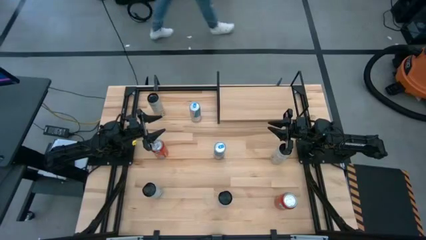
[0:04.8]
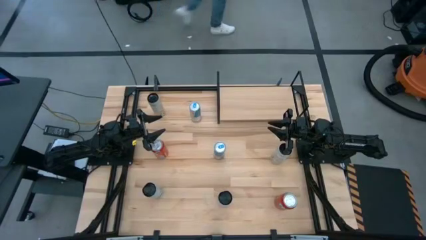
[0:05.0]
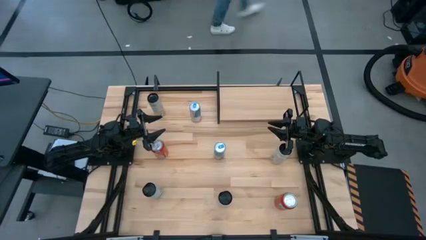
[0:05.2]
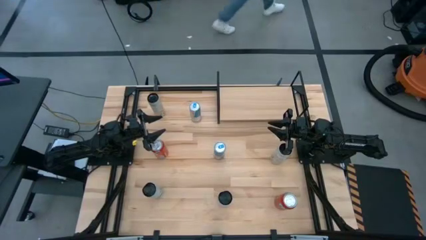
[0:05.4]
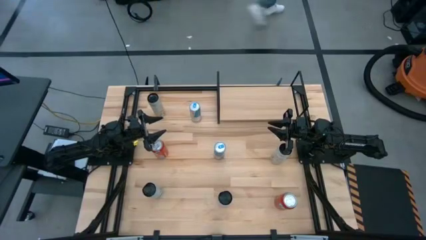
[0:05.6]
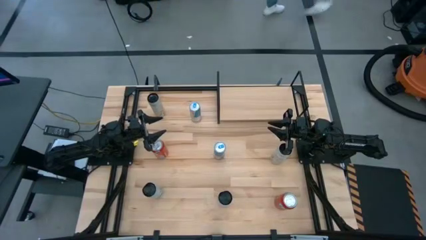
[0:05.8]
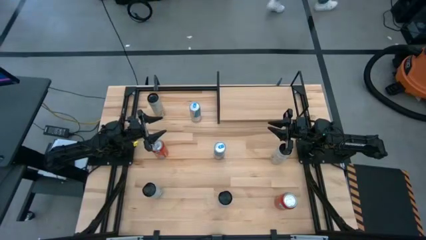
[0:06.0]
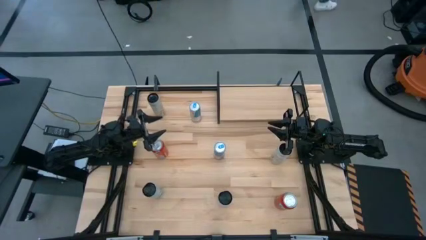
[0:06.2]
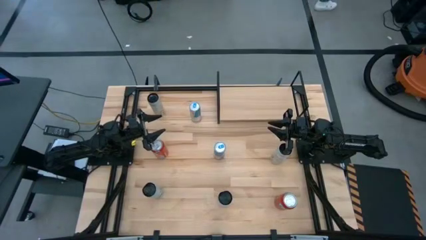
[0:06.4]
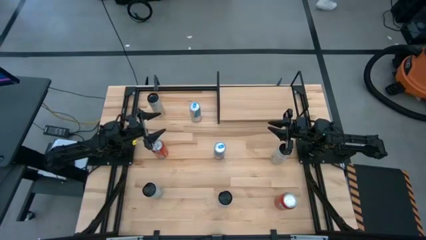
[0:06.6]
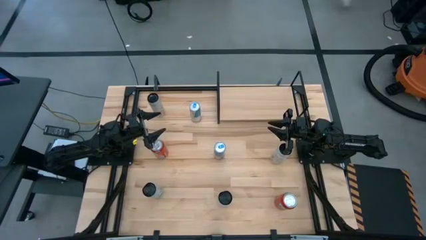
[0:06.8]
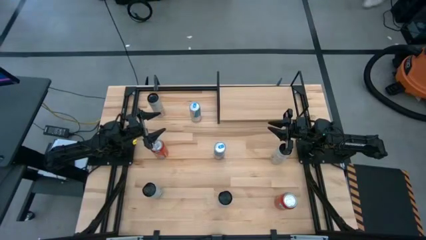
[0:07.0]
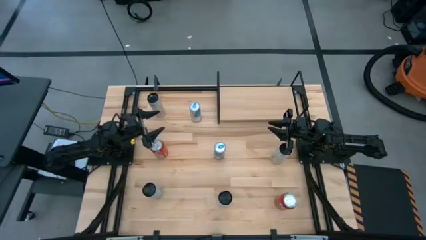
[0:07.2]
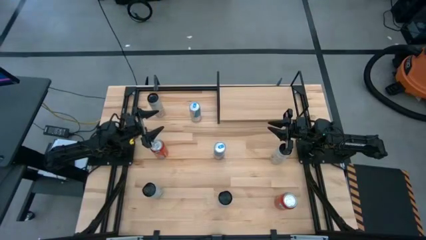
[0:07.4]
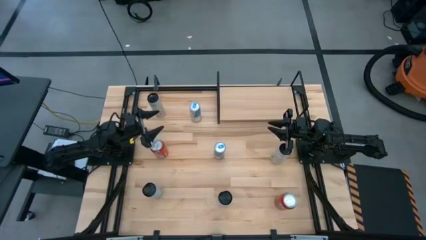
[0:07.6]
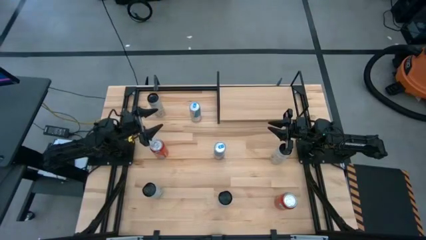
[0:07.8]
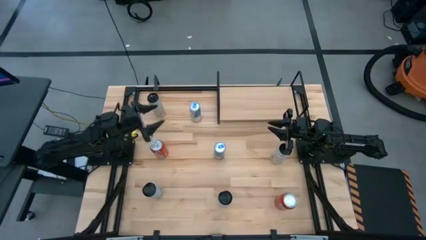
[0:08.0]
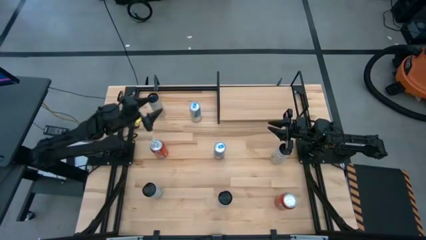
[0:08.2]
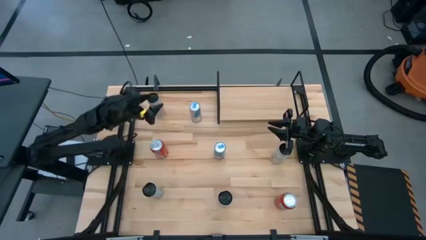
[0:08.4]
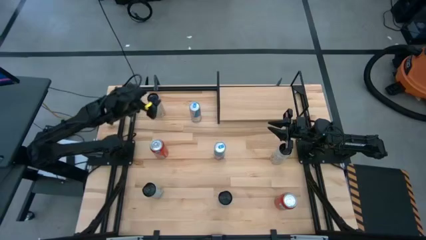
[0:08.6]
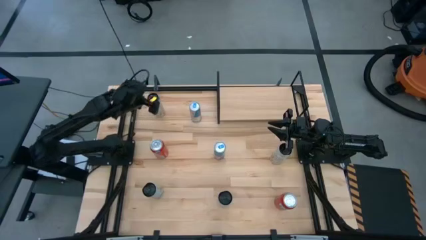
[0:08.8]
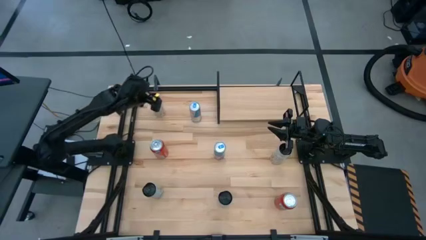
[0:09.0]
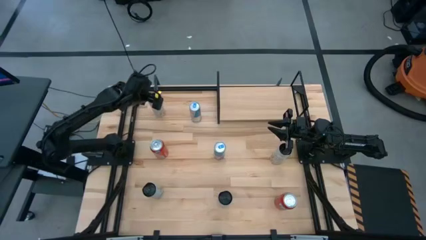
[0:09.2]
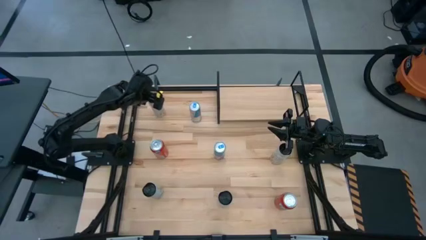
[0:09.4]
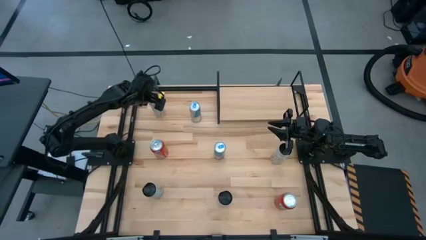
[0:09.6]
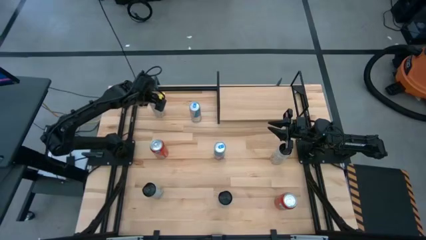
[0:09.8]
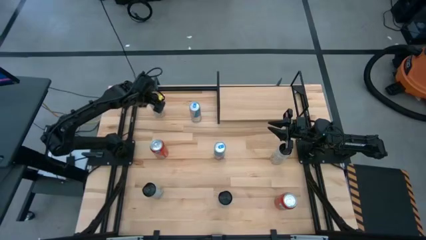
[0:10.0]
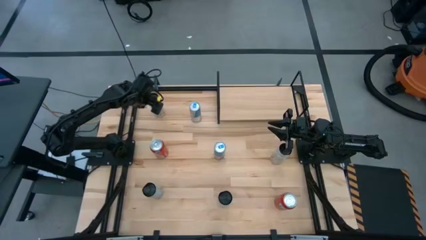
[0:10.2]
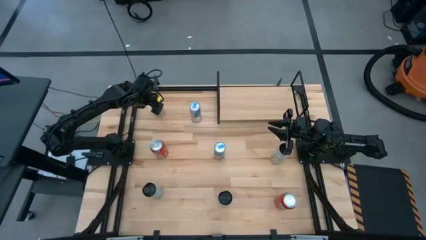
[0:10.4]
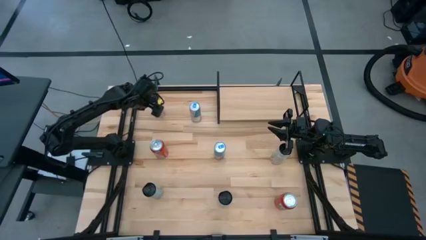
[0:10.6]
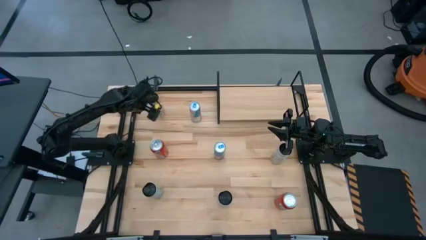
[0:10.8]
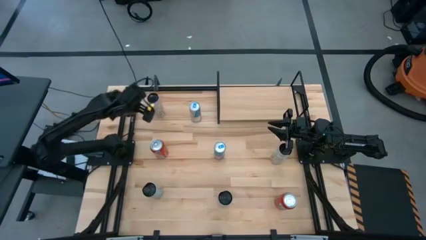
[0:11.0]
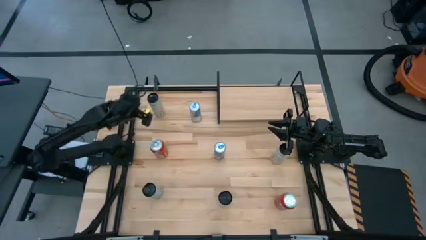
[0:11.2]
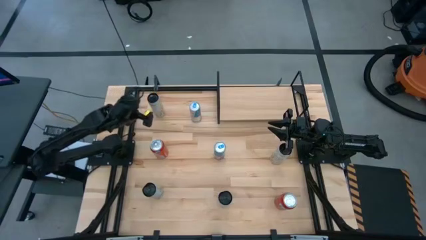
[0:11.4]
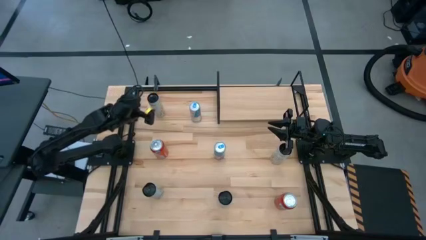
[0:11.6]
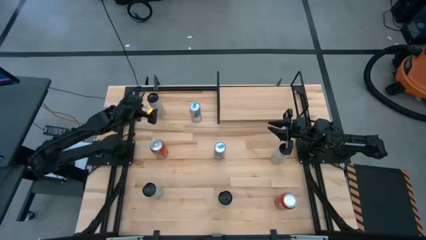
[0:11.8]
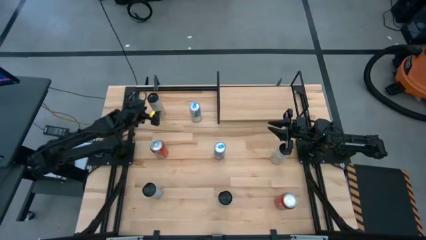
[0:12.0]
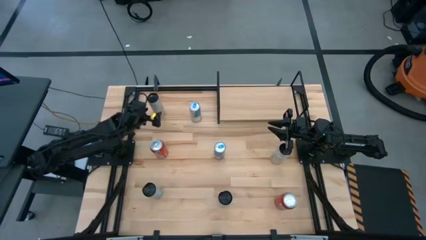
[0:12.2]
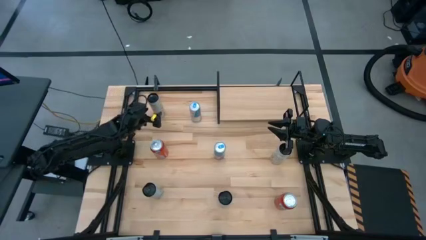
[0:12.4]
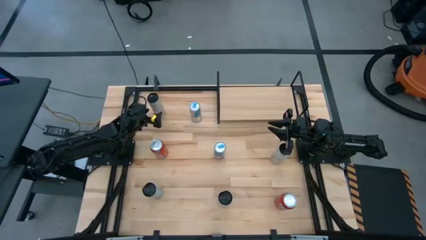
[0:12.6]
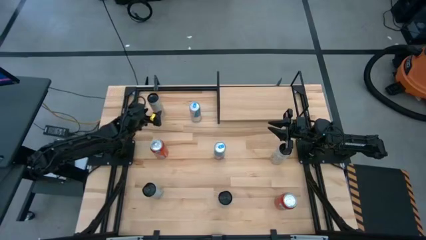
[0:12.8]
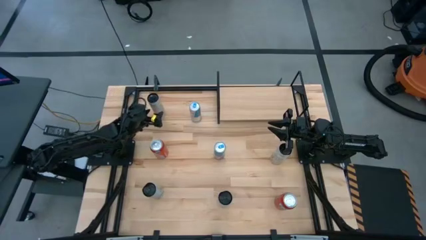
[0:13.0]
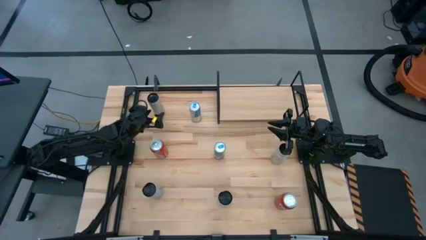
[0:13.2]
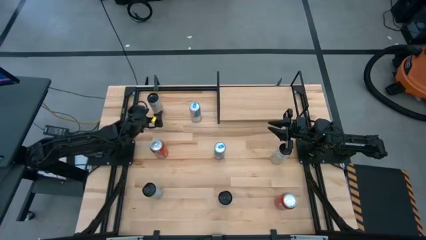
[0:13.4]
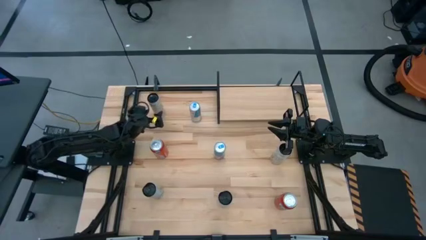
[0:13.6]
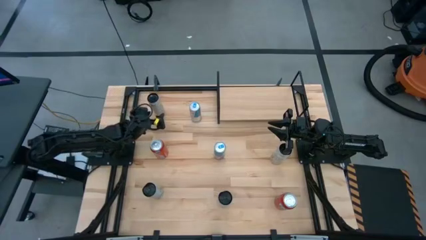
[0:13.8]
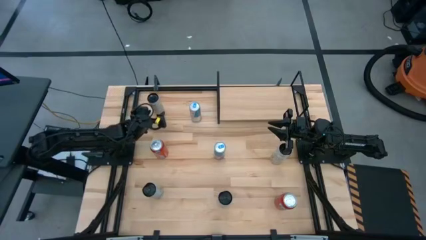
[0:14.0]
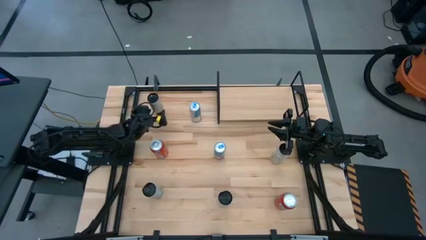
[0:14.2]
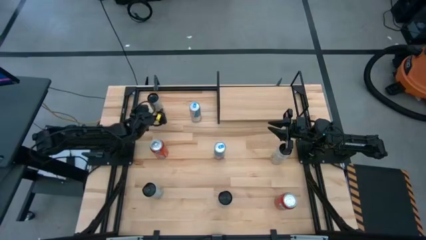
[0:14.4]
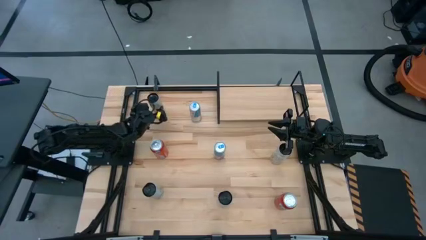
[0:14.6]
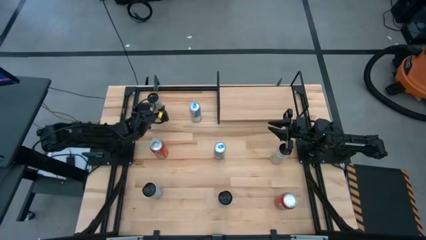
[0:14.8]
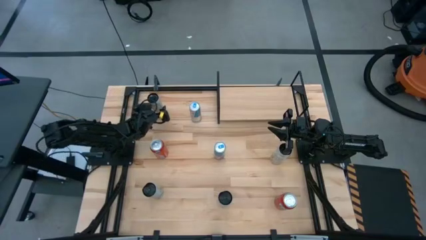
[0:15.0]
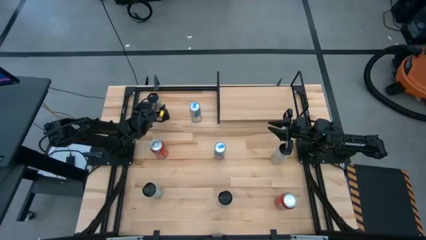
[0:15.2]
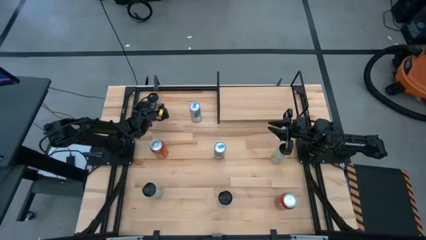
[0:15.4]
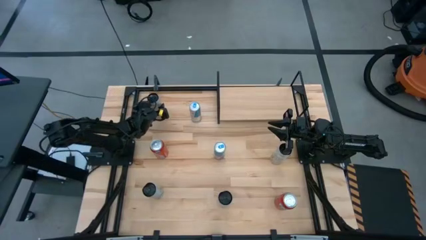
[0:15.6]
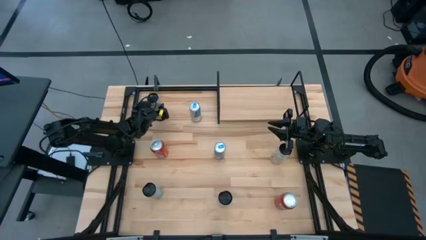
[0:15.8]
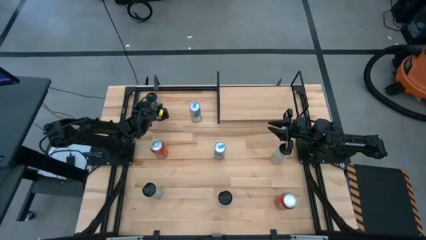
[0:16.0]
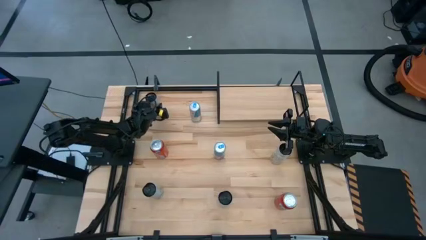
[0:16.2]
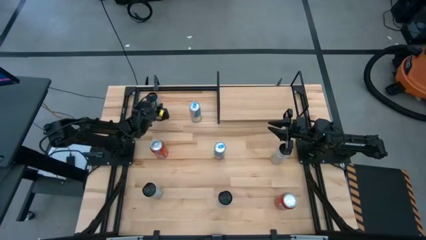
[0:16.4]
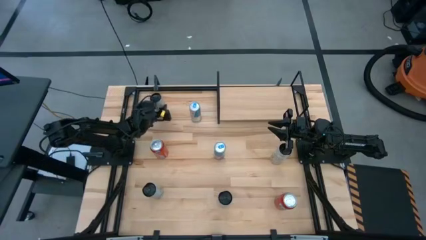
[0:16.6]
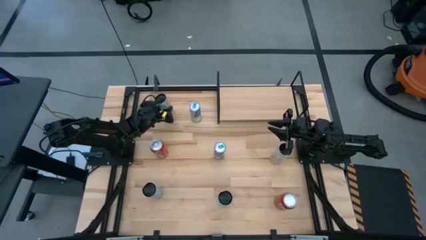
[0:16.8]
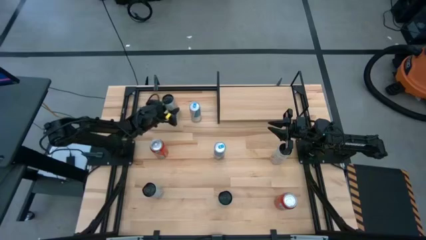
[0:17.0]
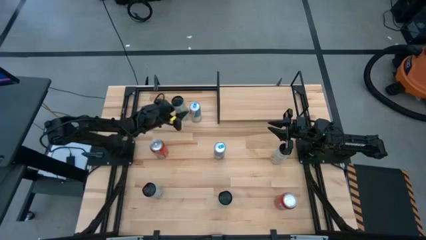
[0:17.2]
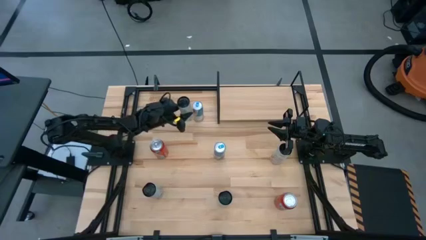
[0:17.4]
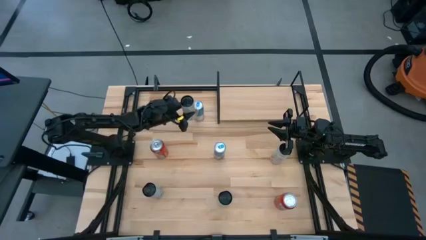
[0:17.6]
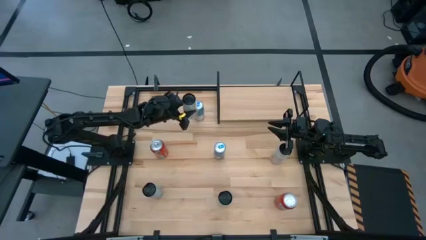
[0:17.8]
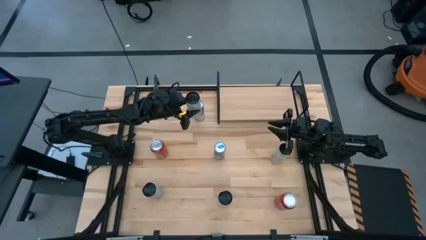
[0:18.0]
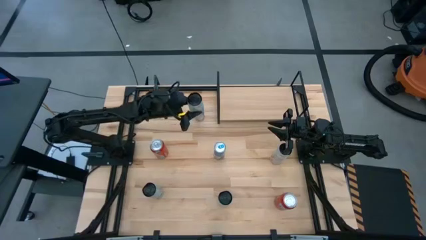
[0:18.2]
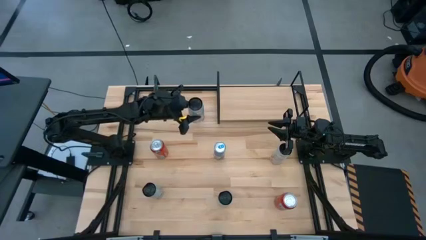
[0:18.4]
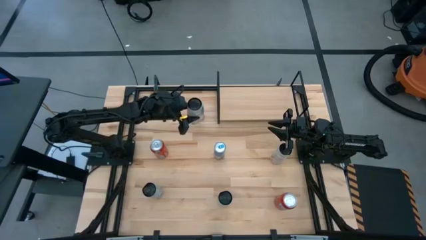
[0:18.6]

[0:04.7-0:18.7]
Task: Place canned beverage on shelf
Put the top white yellow soda can on the shelf
